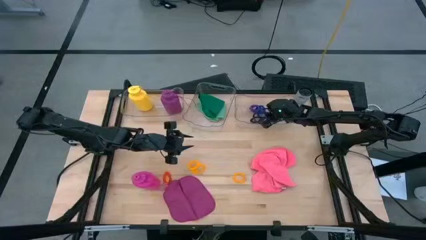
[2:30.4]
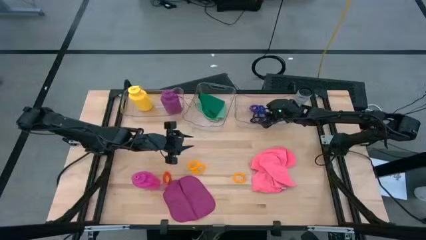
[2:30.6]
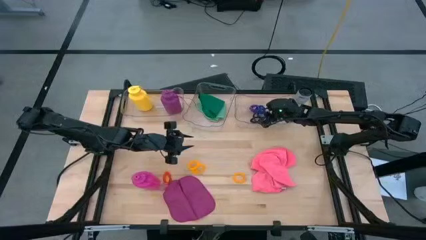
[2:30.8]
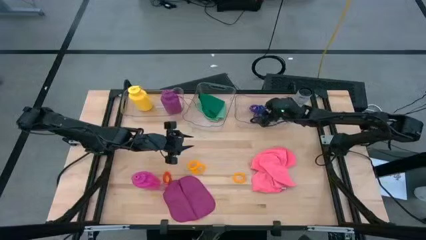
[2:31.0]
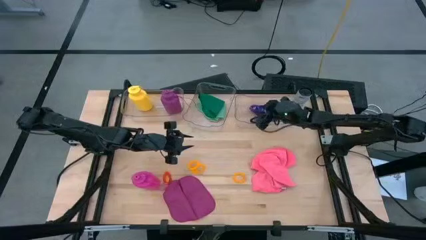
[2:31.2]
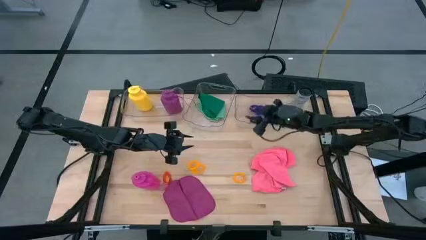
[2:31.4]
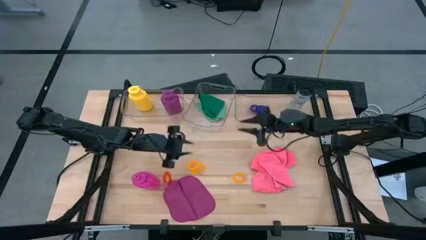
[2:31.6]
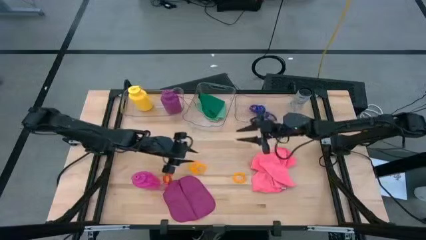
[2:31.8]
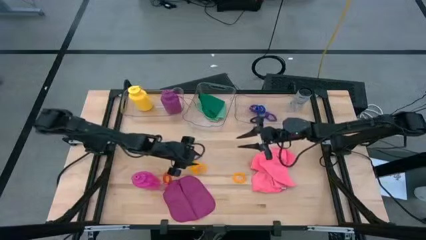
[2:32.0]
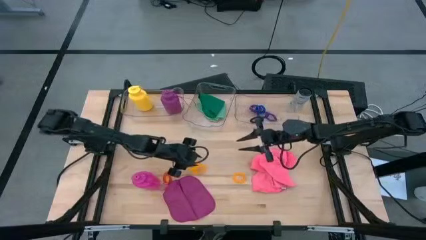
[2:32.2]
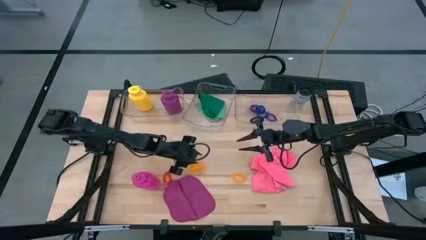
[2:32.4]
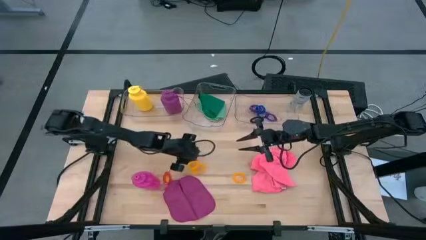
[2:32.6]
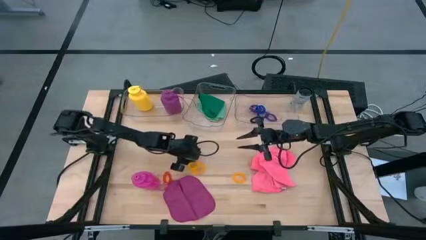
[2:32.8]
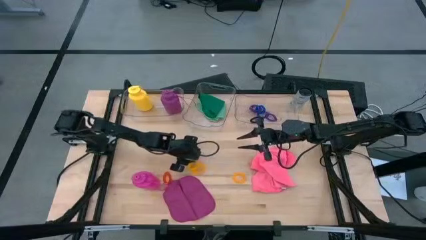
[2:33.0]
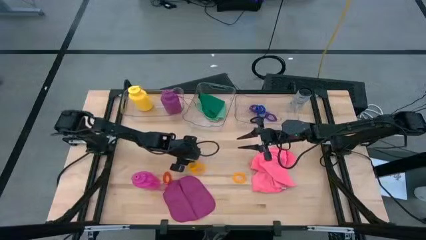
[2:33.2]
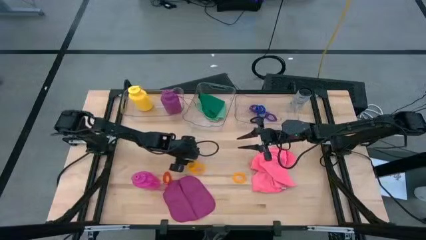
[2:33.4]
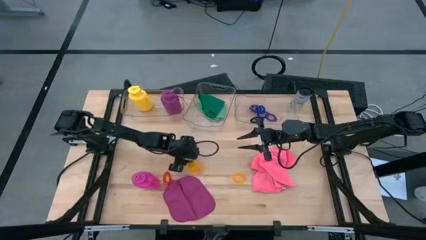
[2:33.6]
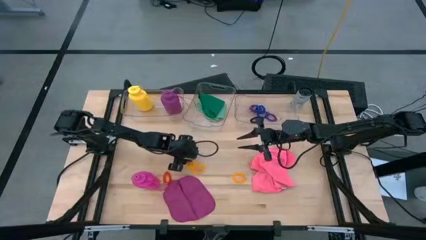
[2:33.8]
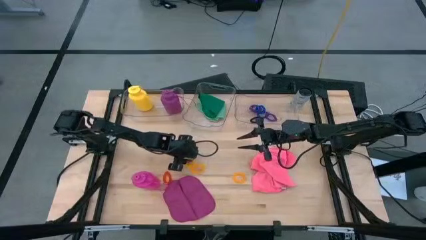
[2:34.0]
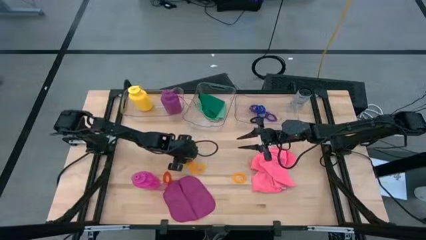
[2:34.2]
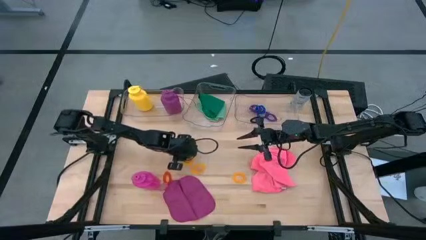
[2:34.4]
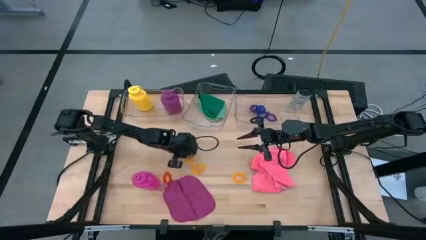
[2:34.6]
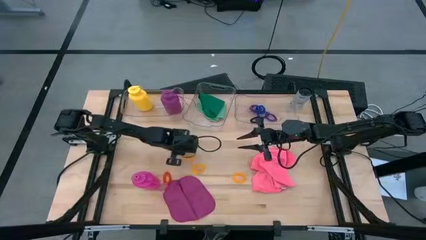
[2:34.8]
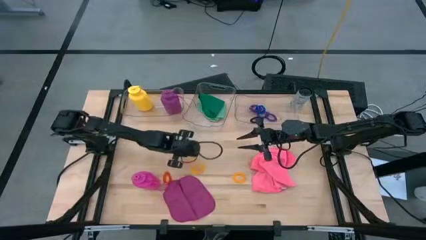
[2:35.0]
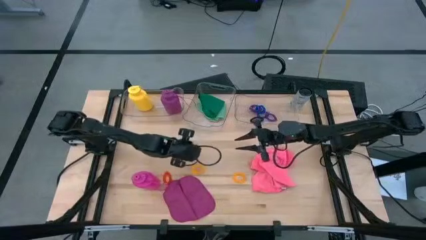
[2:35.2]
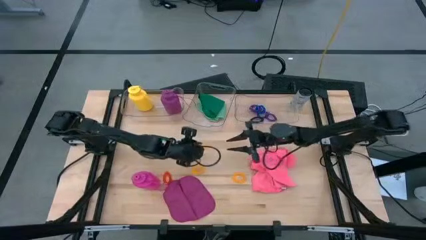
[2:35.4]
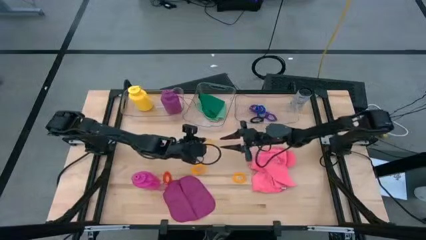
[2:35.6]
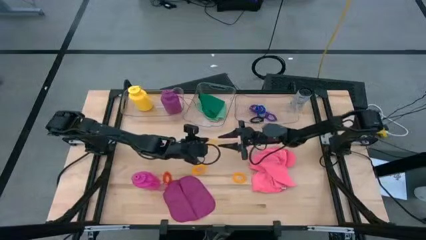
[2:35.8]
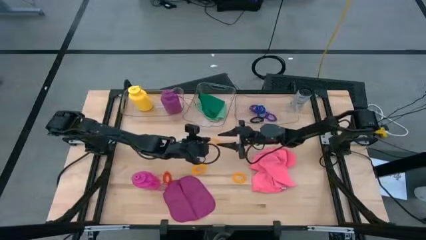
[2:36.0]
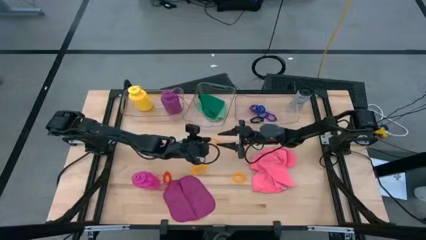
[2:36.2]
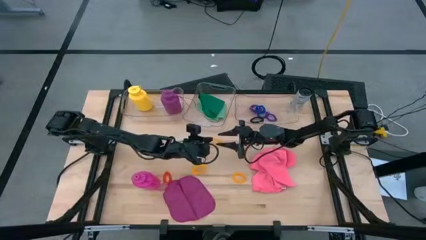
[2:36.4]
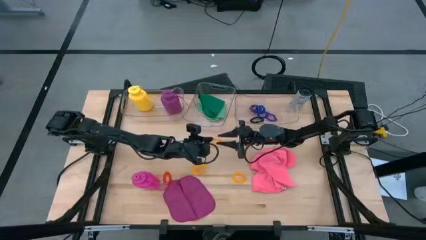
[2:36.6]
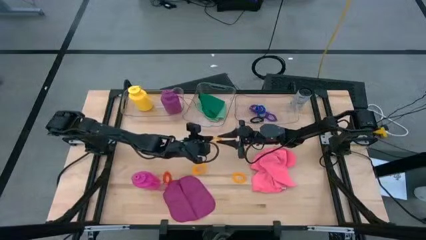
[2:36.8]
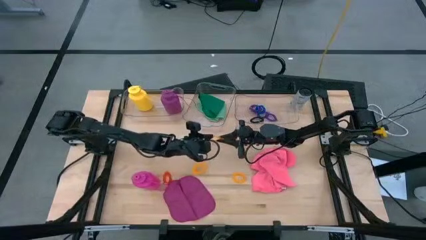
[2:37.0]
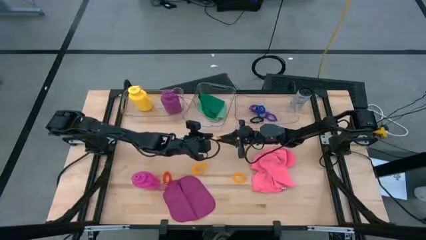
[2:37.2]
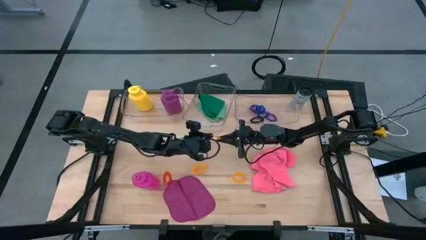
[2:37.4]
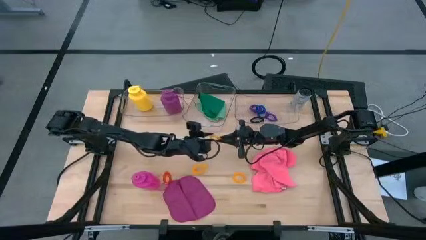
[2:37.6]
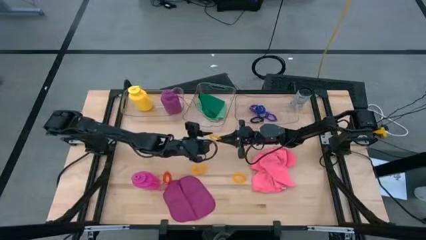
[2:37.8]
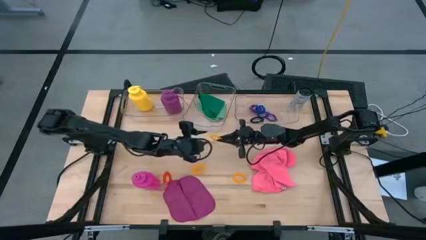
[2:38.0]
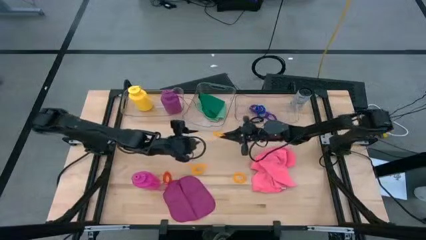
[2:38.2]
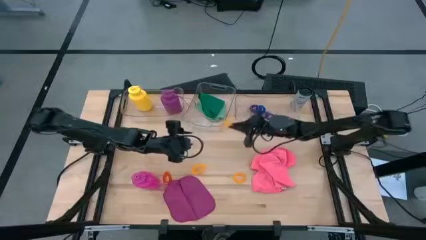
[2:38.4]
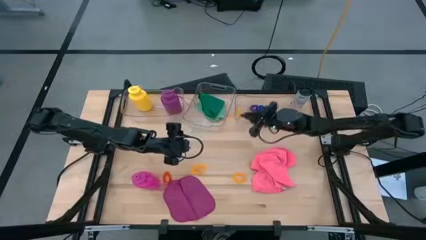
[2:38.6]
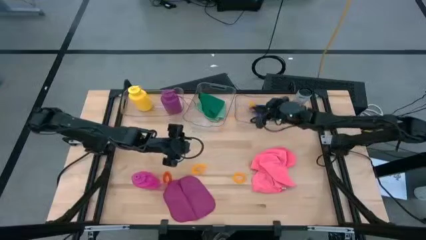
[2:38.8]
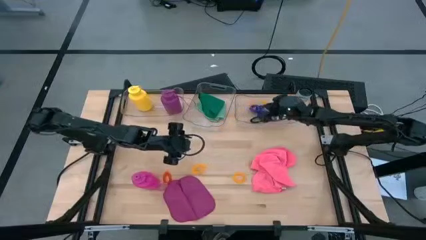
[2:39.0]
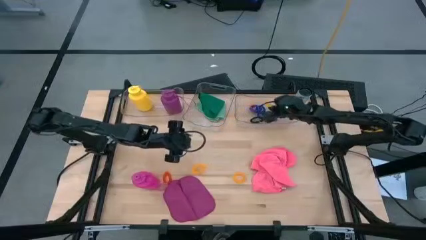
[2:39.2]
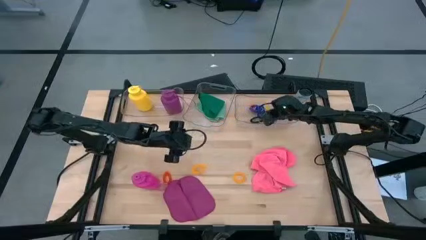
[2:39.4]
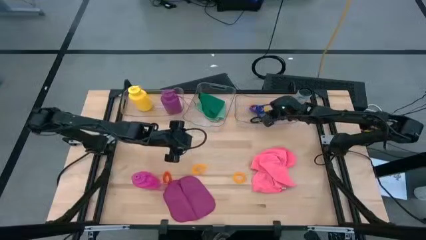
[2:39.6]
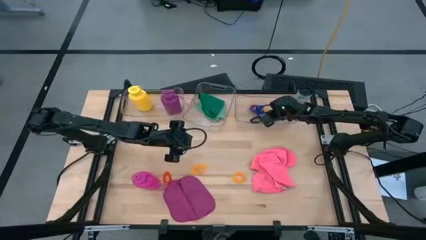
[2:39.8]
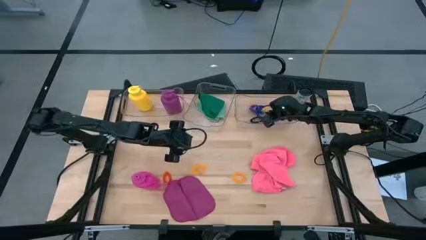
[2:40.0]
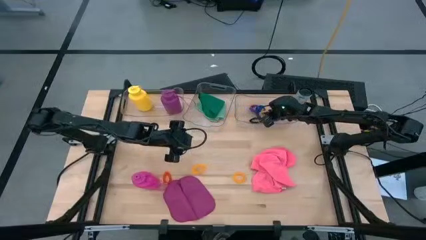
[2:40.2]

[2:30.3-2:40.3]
Task: Pick & Place Sports Items
Put the top yellow spring keychain into the right transparent bin

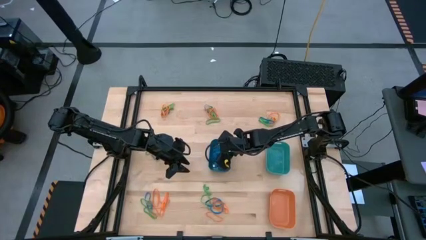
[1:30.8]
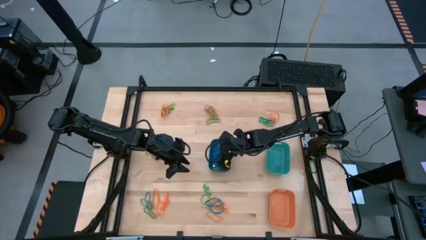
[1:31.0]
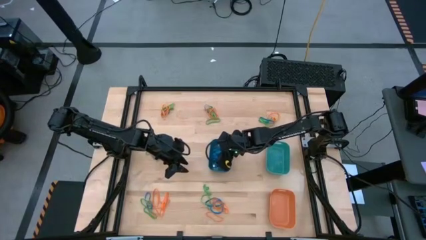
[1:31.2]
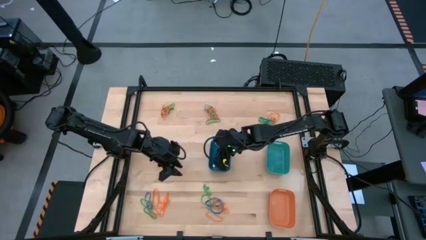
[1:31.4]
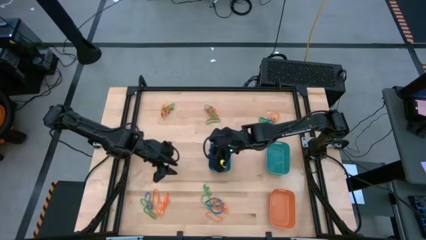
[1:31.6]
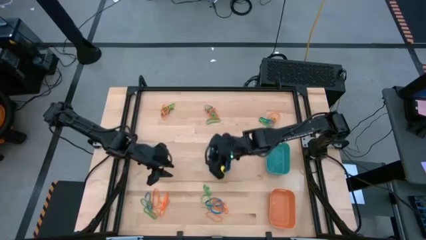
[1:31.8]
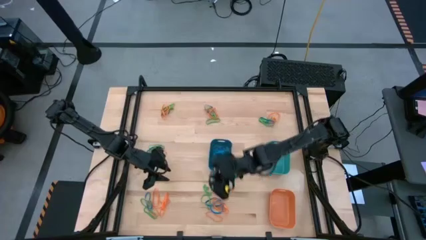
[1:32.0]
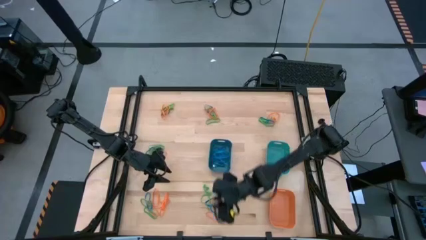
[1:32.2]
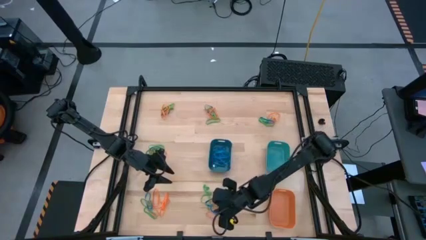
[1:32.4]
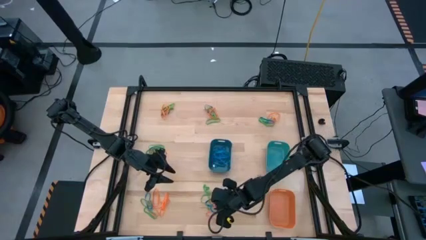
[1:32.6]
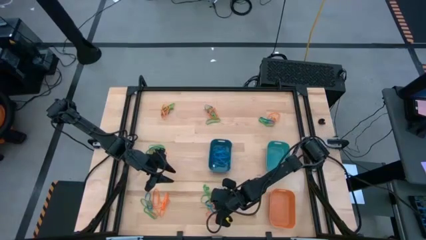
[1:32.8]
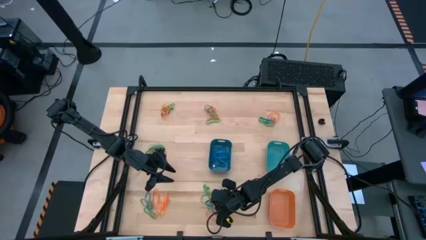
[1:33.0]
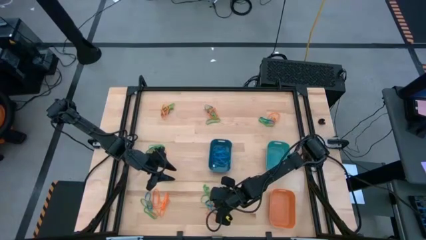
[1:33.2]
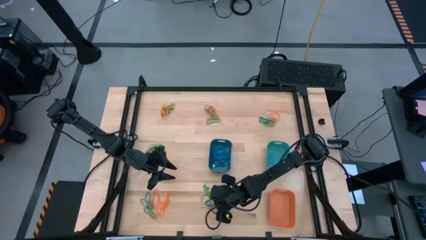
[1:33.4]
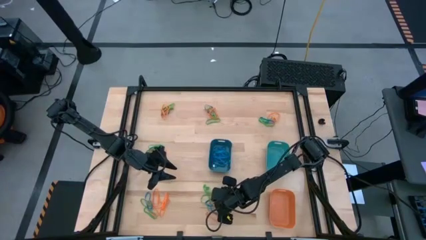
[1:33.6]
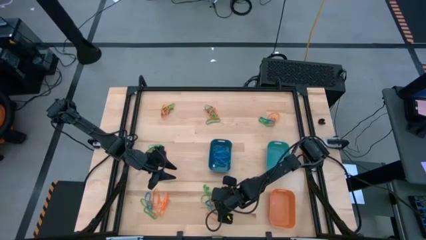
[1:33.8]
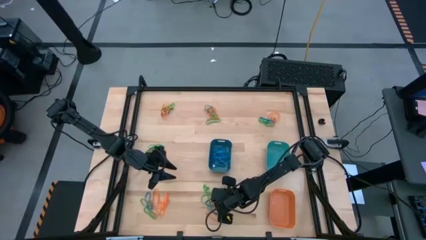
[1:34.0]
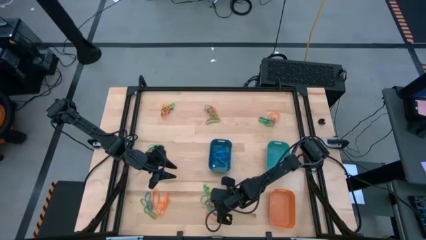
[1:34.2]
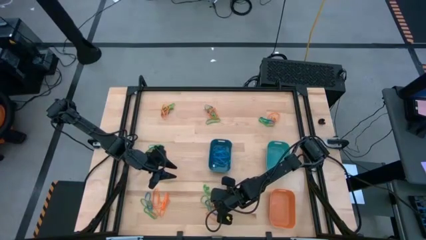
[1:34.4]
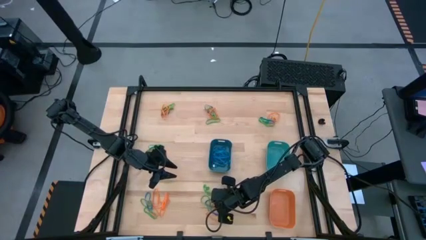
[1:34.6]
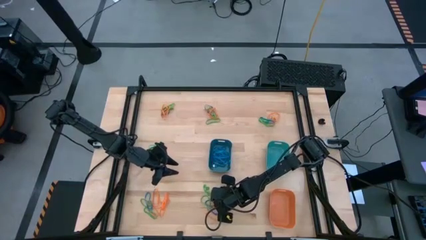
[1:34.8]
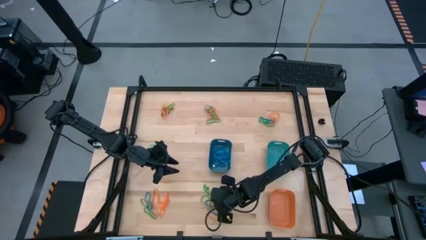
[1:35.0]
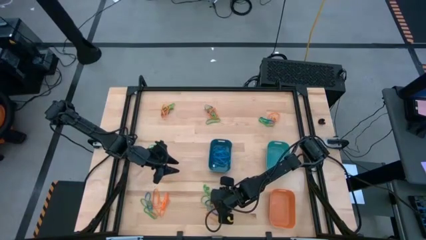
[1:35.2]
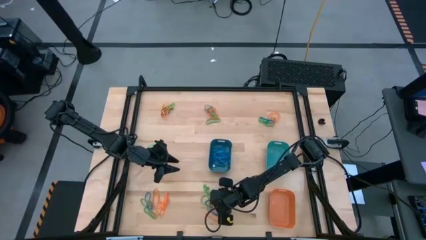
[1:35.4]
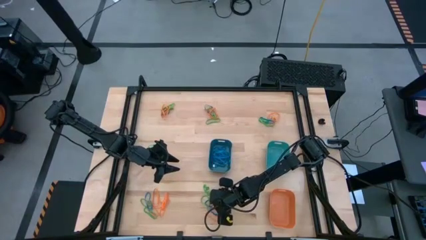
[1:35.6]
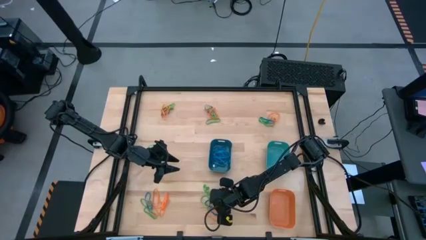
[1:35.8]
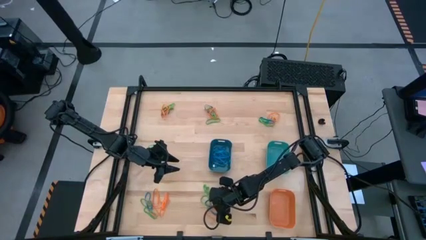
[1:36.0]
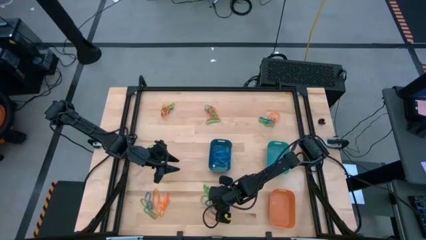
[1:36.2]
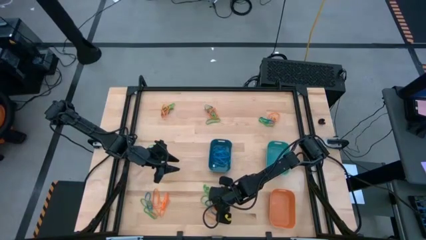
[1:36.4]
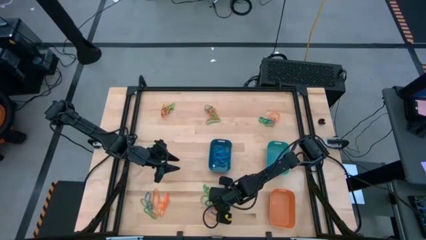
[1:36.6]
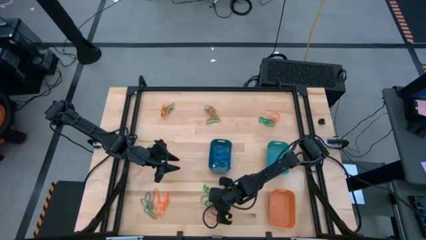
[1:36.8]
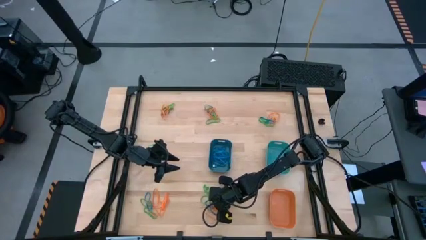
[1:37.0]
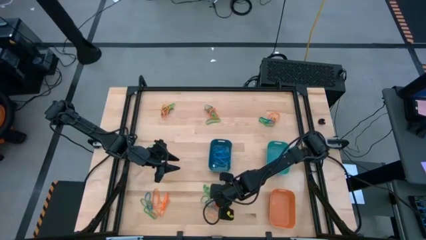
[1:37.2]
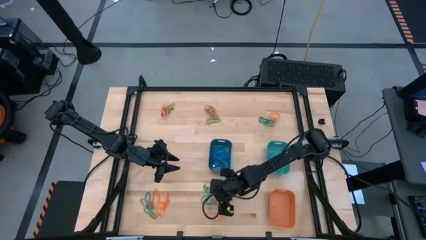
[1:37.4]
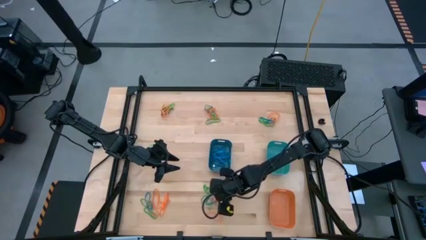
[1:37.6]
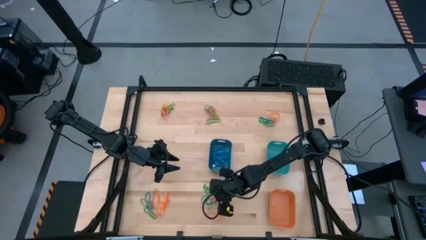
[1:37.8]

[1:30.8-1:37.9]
Task: Sort rubber bands into baskets
Put the blue rubberband into the blue bin
